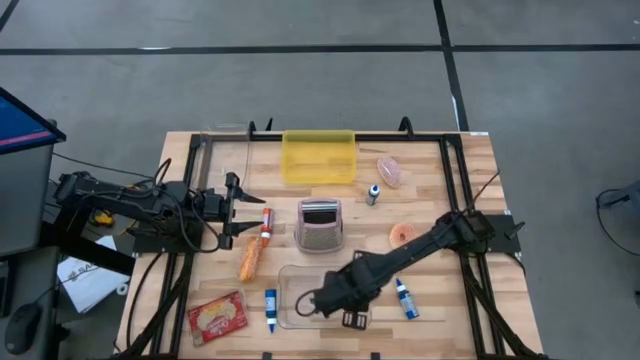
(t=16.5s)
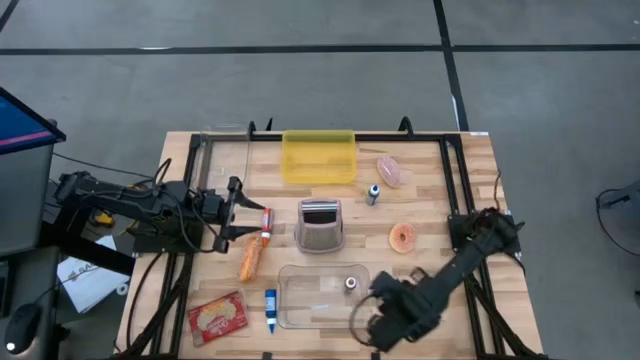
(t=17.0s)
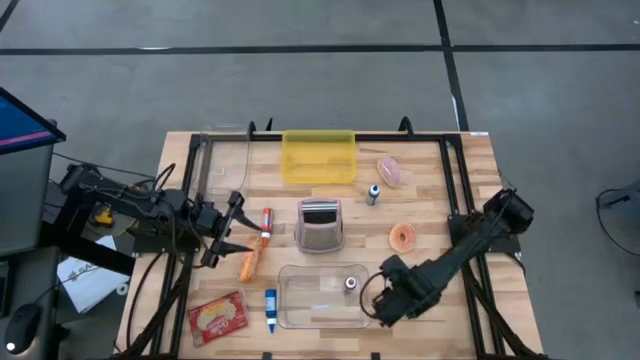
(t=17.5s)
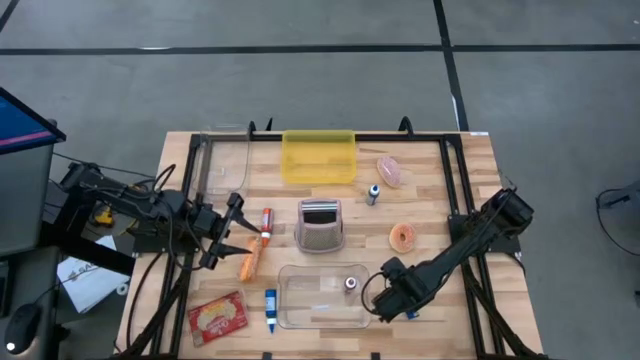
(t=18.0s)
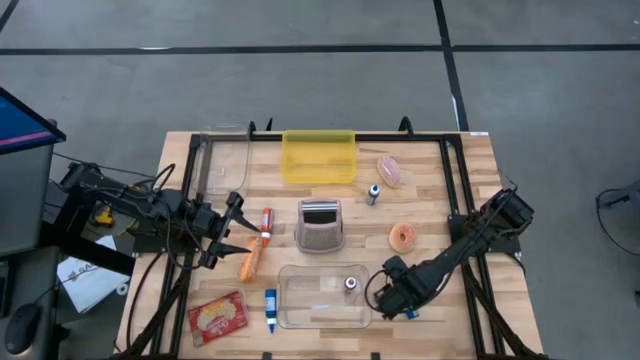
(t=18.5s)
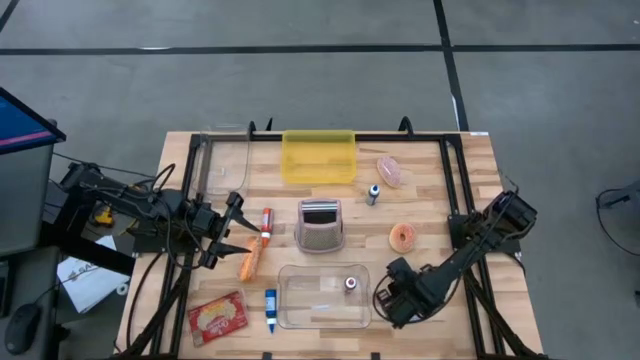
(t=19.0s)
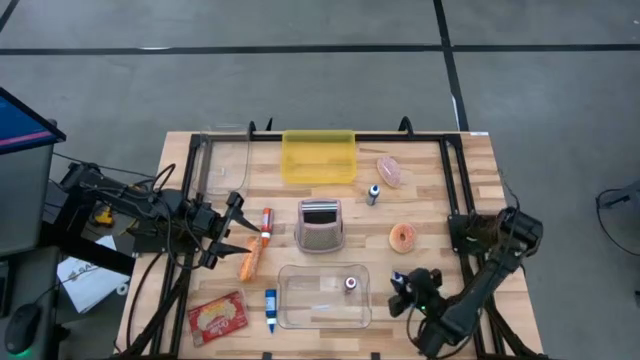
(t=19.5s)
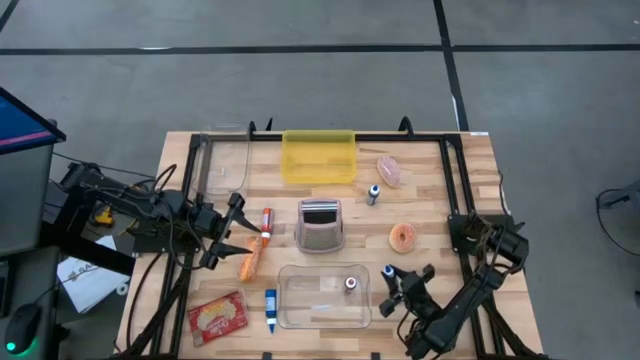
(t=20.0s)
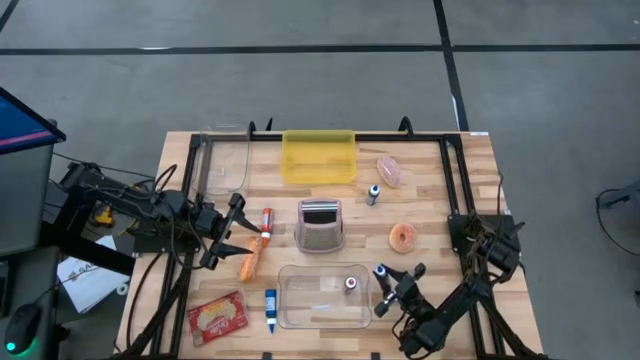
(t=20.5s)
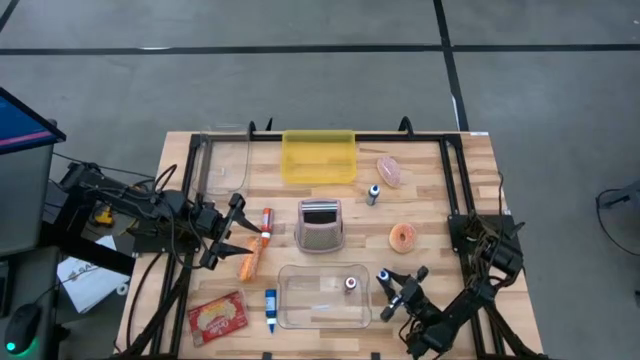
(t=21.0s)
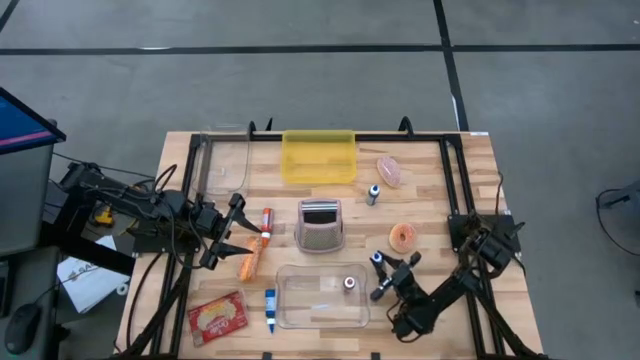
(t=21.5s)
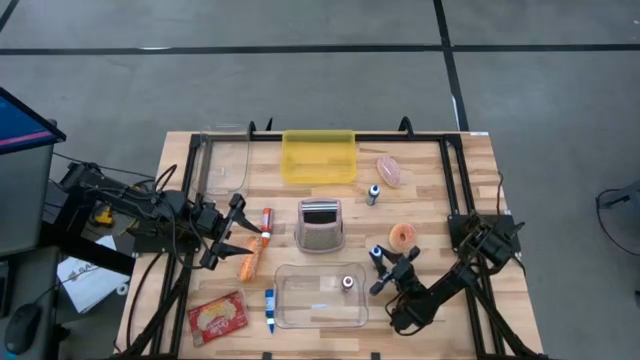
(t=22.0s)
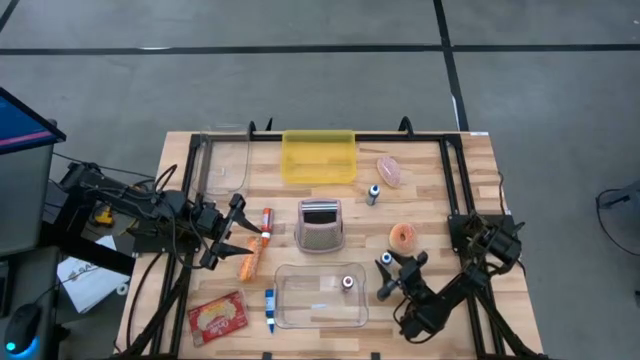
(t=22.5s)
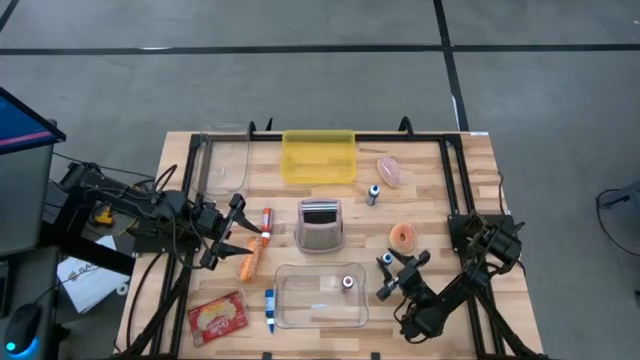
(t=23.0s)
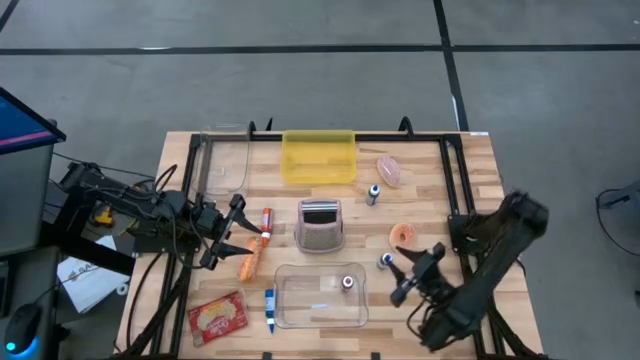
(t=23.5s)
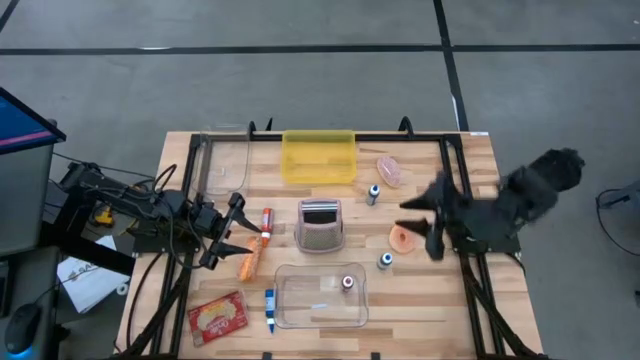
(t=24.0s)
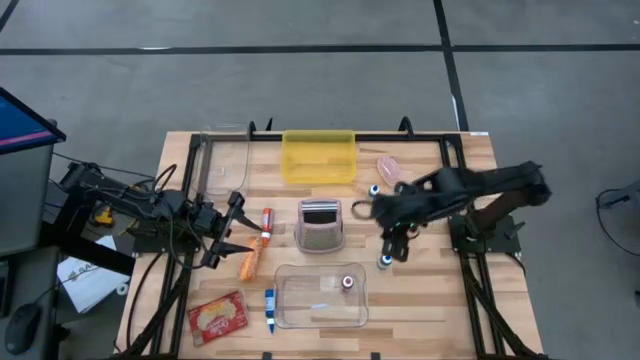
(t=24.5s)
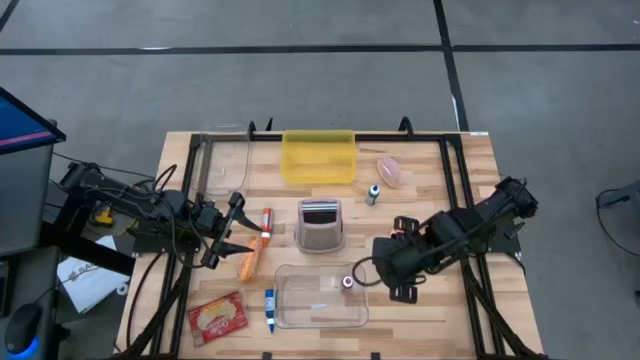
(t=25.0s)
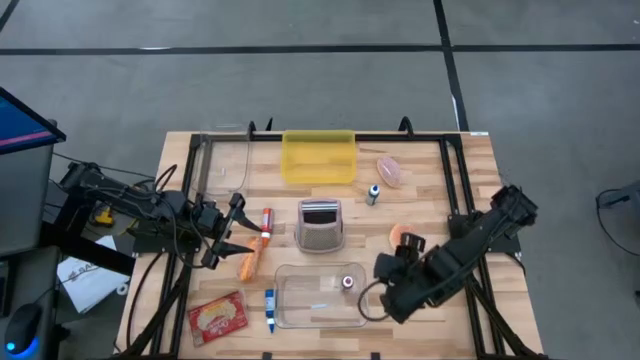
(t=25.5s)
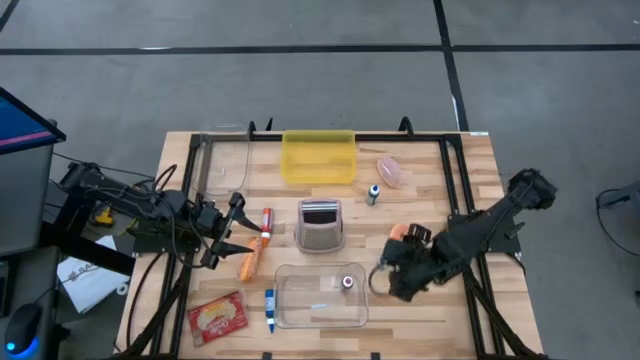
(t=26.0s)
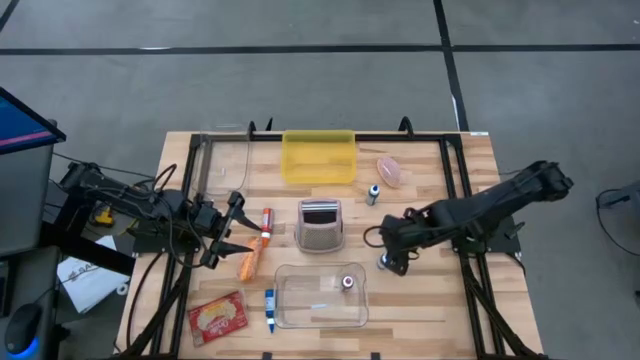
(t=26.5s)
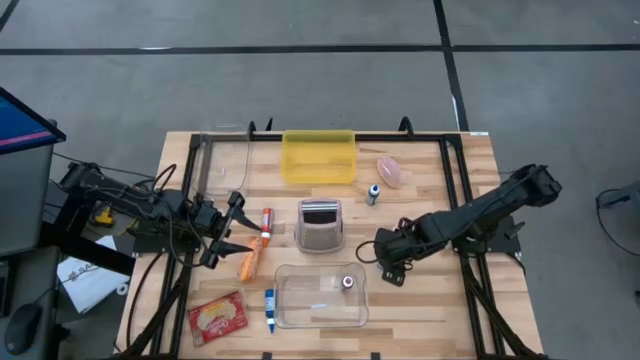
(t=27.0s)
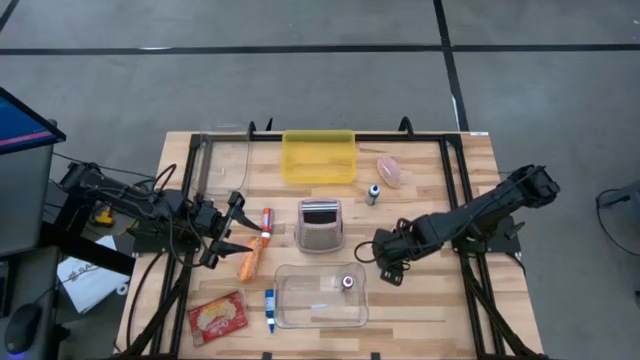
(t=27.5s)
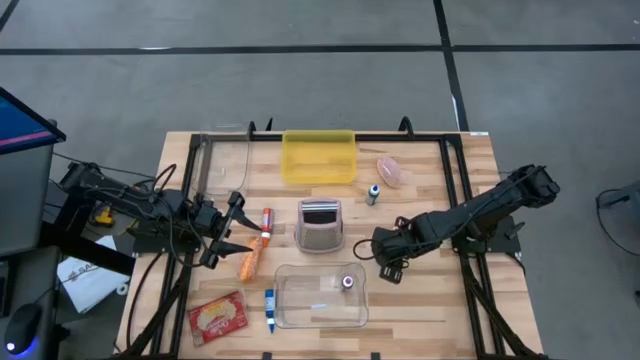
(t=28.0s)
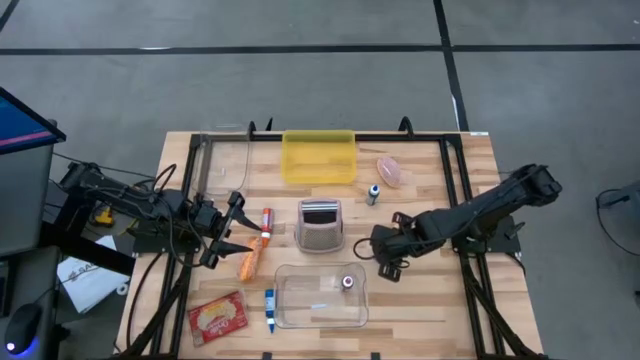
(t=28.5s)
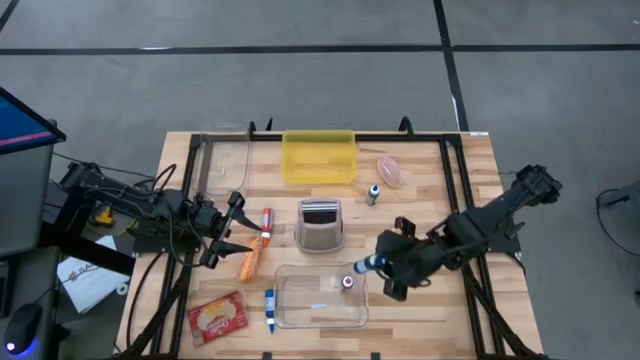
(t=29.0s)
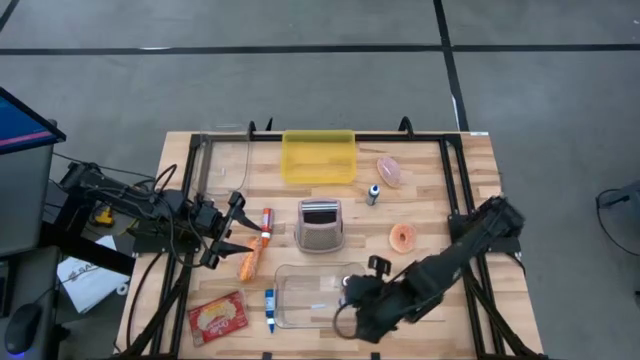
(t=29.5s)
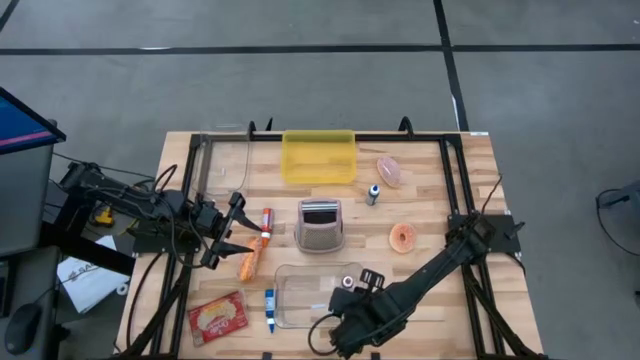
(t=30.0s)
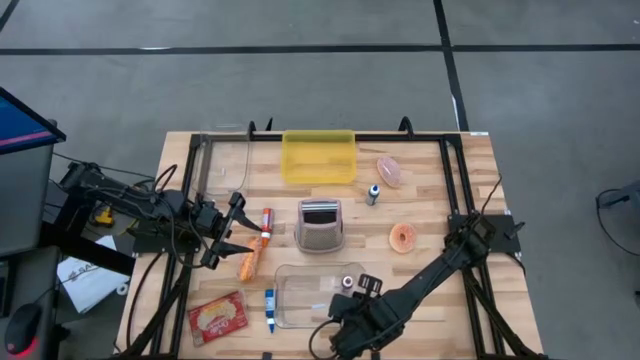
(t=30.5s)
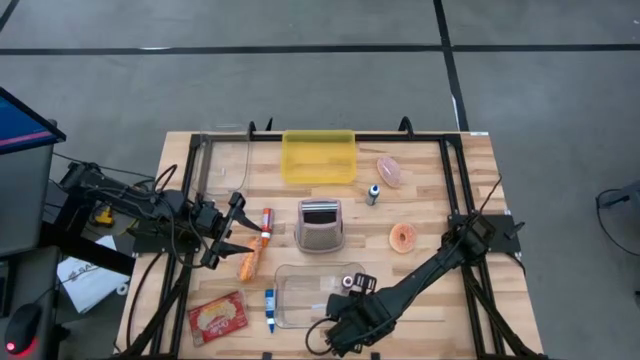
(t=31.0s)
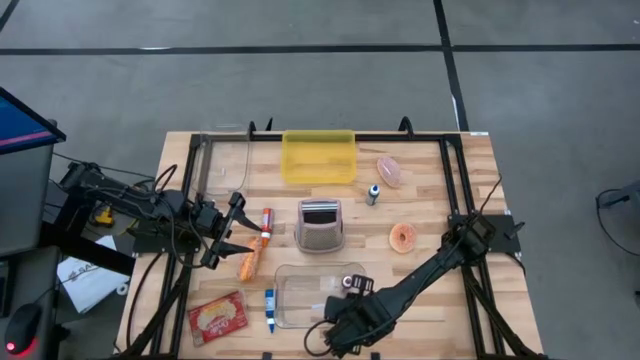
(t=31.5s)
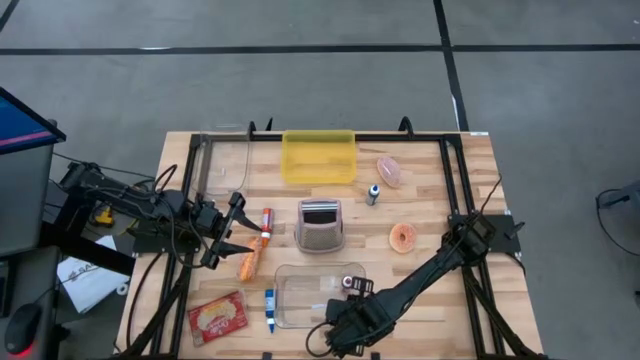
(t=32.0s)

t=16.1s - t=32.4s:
Put the bottom right blue food coloring bottle into the bottom transparent bin

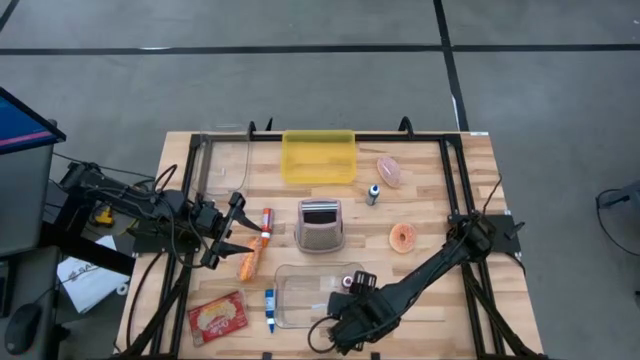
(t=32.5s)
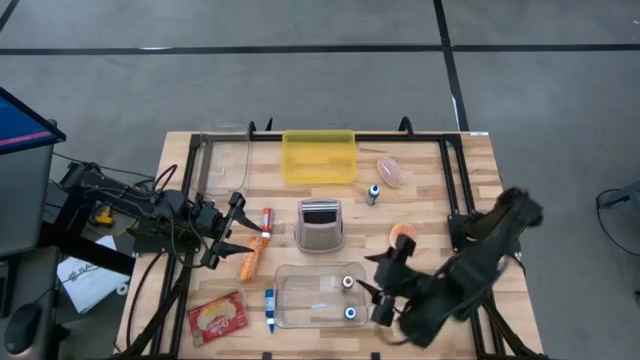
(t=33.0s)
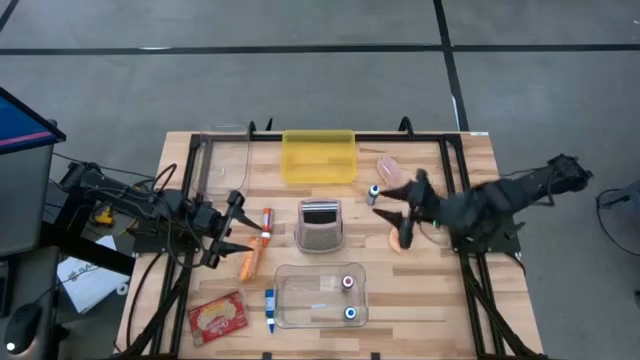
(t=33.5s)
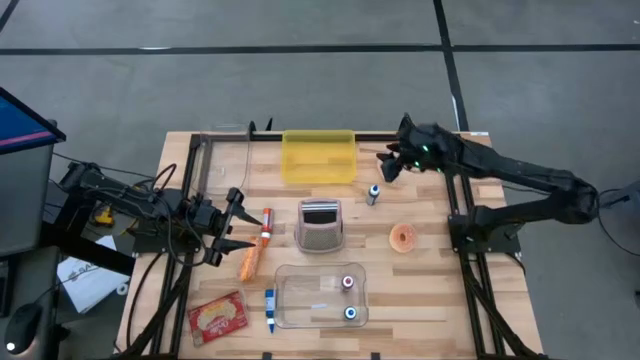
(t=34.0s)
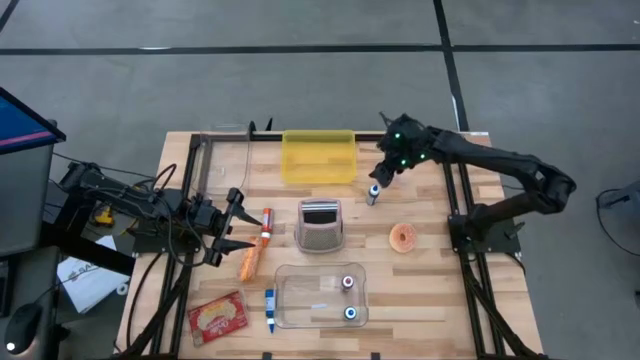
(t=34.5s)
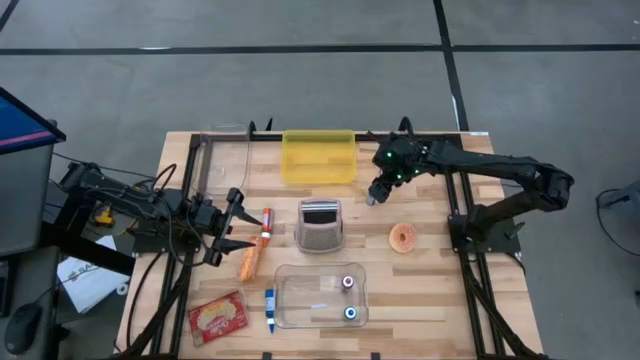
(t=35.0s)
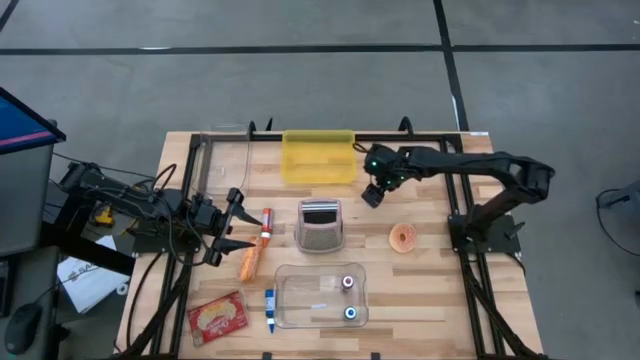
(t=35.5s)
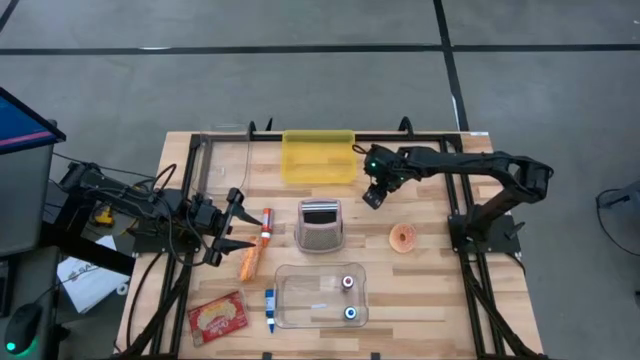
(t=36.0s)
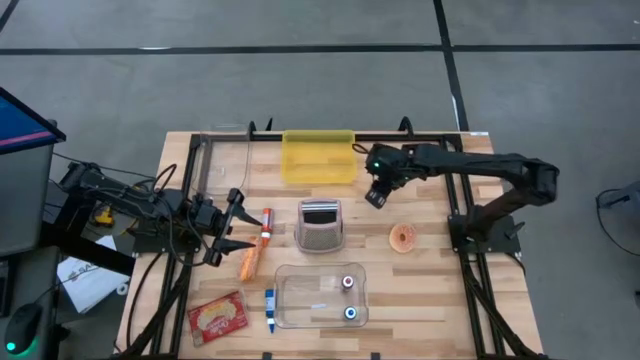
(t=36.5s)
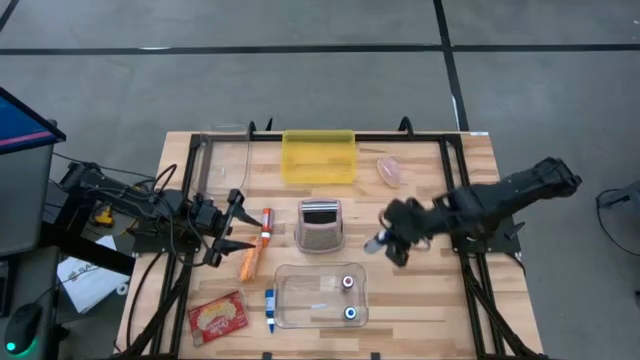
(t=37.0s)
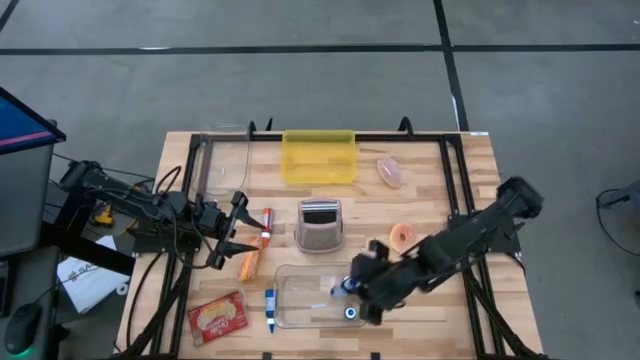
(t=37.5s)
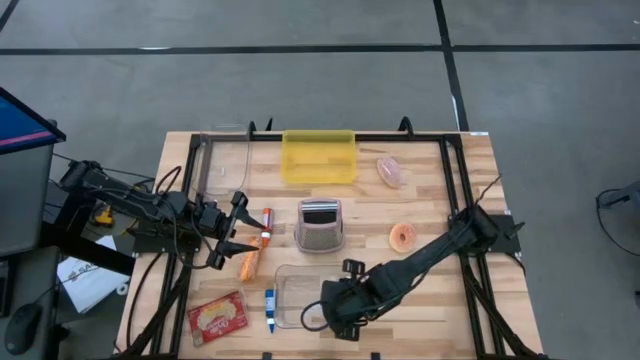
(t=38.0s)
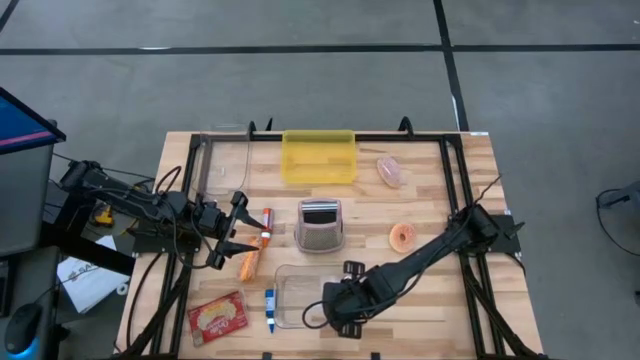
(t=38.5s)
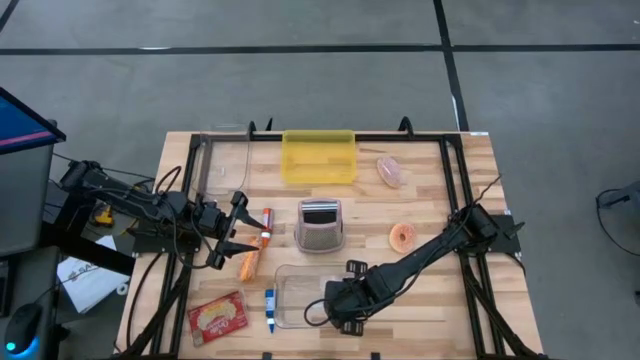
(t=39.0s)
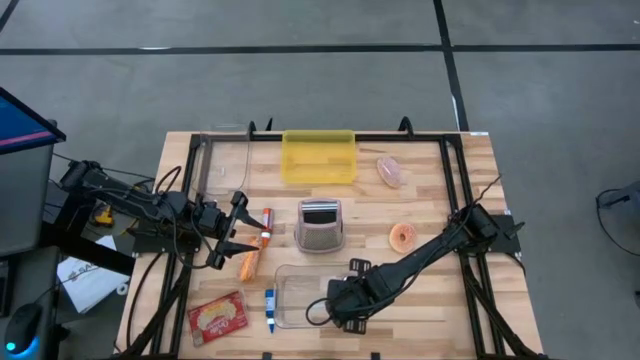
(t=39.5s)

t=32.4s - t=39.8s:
Put the top blue food coloring bottle into the bottom transparent bin
